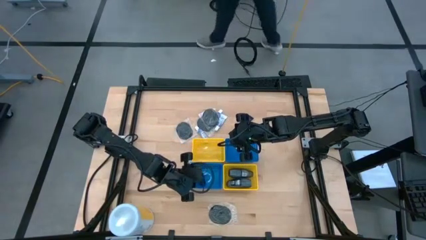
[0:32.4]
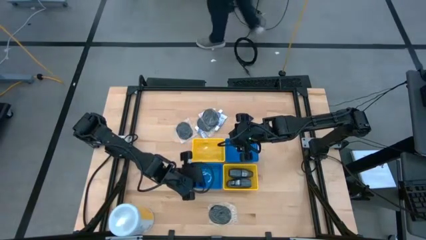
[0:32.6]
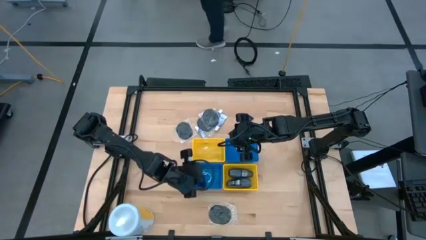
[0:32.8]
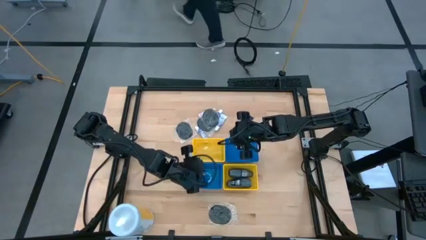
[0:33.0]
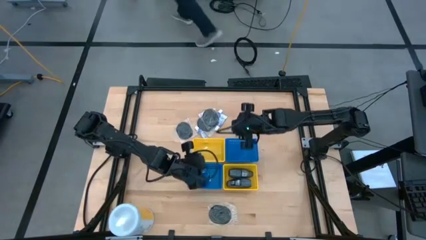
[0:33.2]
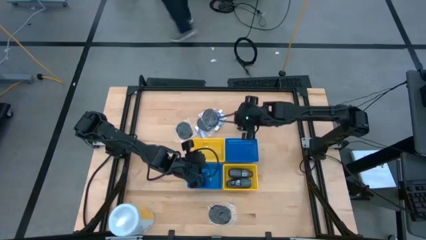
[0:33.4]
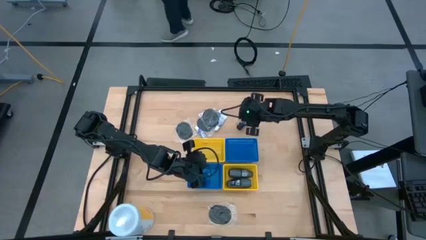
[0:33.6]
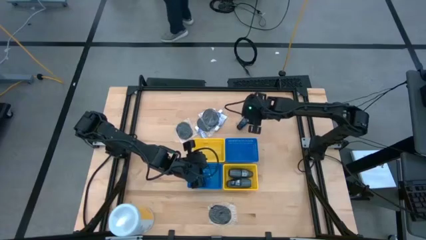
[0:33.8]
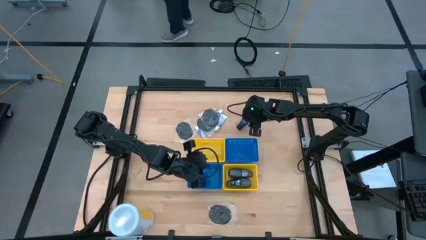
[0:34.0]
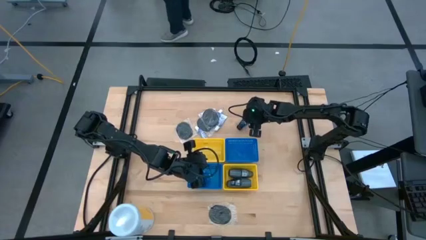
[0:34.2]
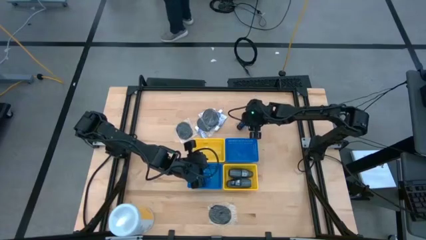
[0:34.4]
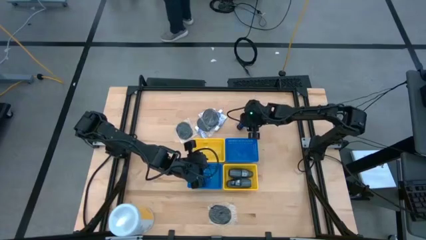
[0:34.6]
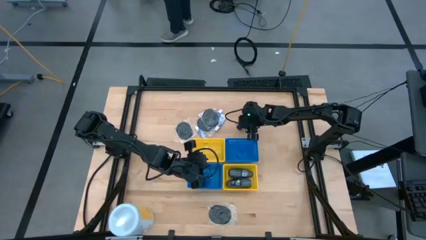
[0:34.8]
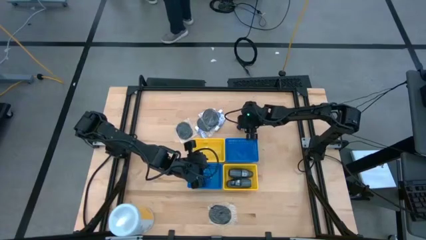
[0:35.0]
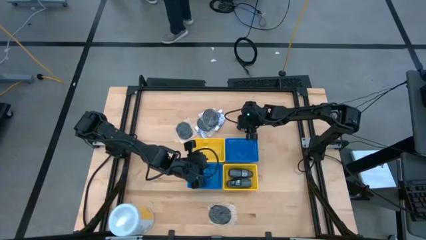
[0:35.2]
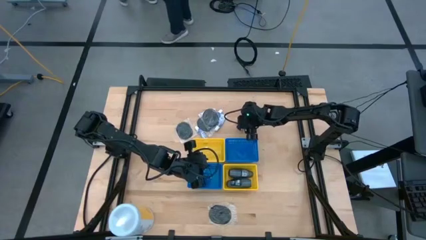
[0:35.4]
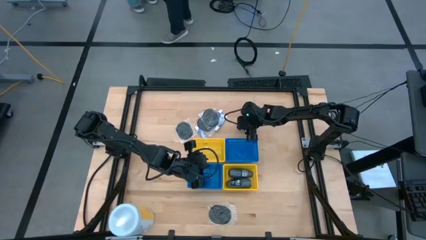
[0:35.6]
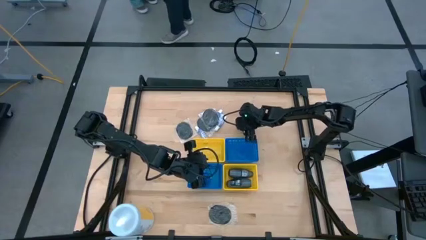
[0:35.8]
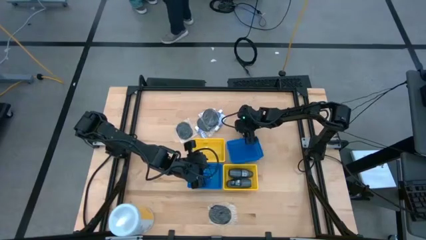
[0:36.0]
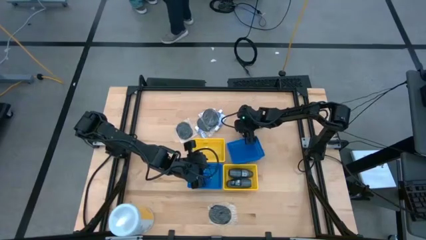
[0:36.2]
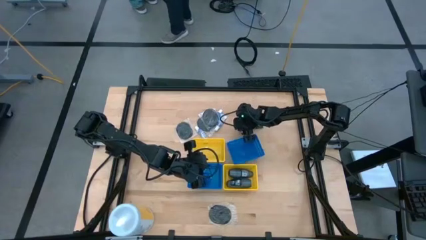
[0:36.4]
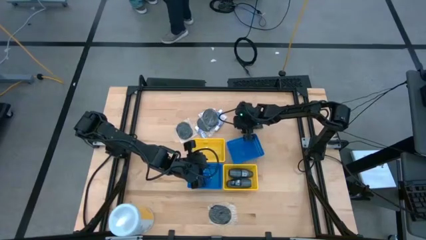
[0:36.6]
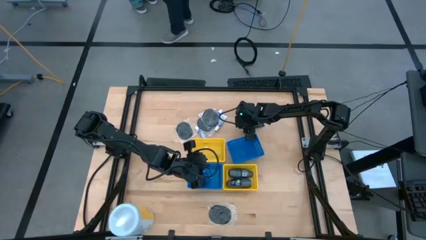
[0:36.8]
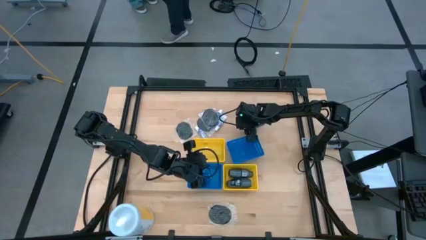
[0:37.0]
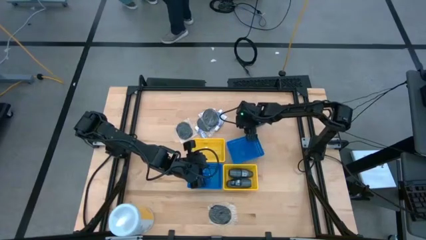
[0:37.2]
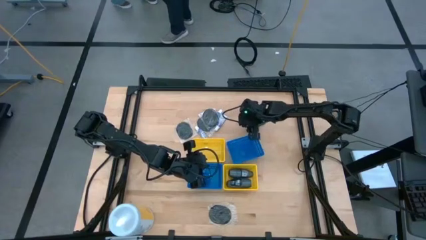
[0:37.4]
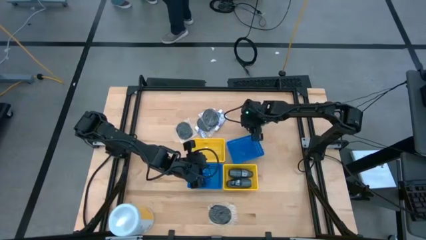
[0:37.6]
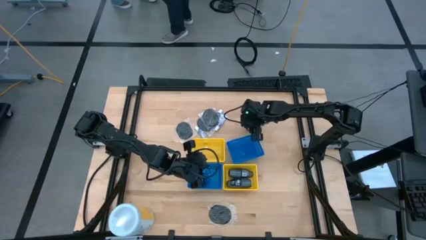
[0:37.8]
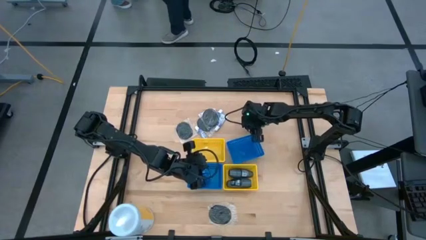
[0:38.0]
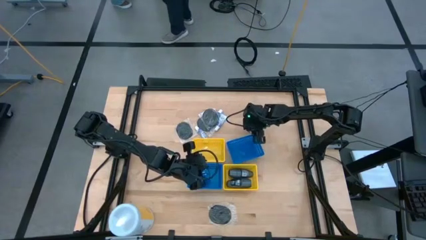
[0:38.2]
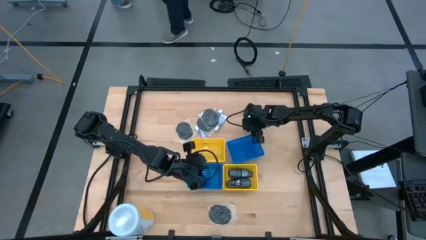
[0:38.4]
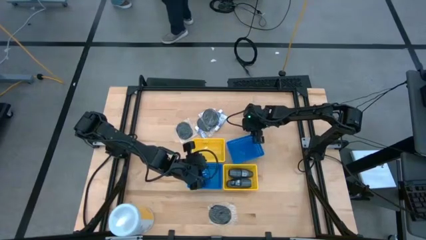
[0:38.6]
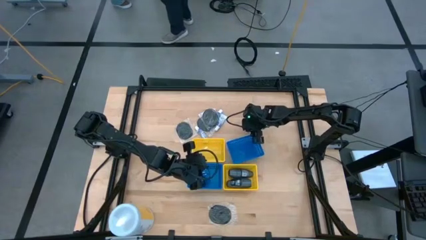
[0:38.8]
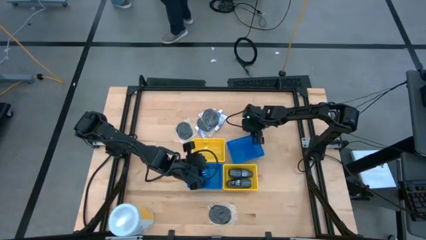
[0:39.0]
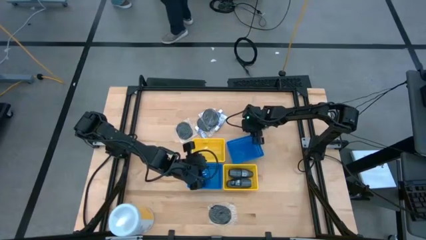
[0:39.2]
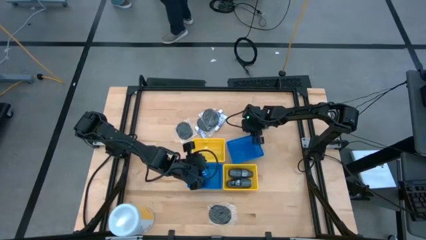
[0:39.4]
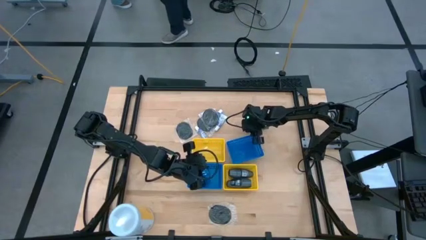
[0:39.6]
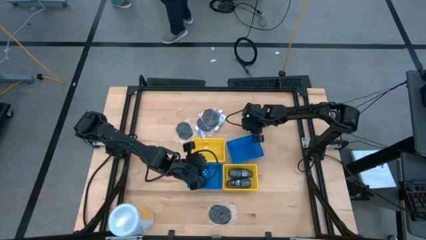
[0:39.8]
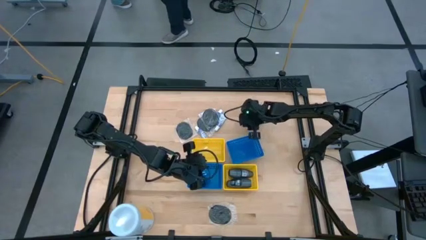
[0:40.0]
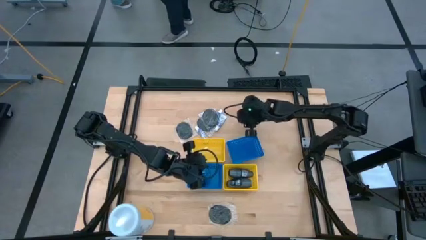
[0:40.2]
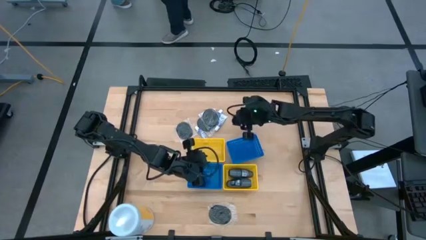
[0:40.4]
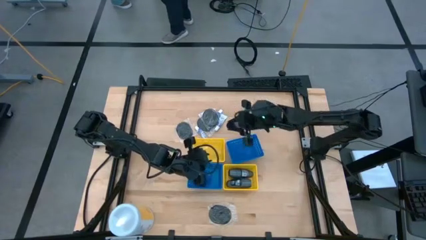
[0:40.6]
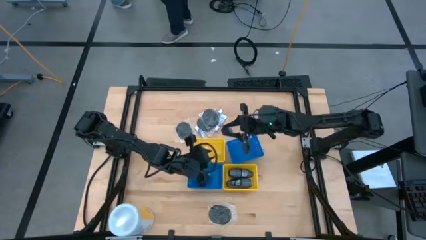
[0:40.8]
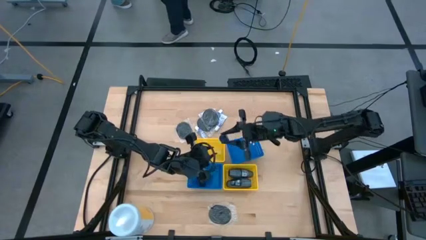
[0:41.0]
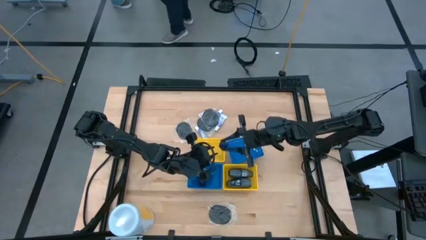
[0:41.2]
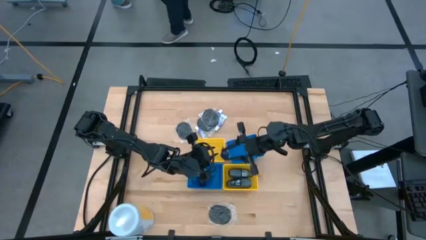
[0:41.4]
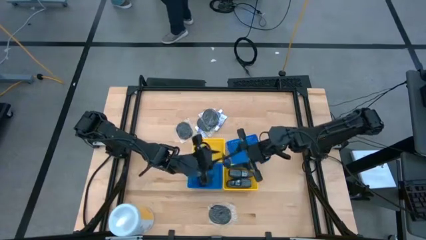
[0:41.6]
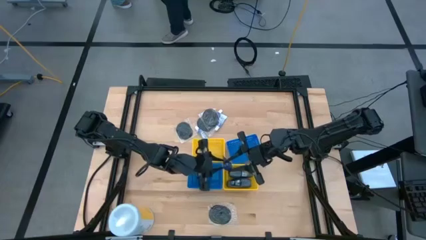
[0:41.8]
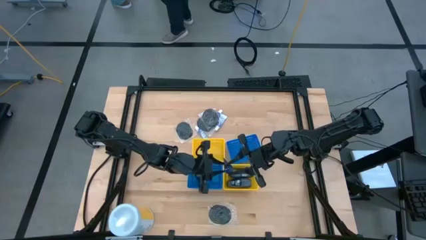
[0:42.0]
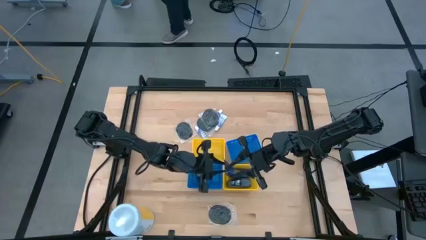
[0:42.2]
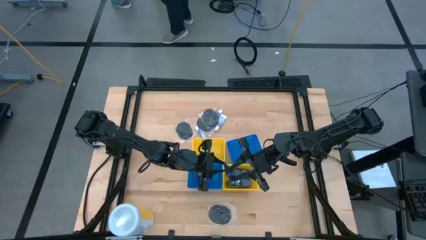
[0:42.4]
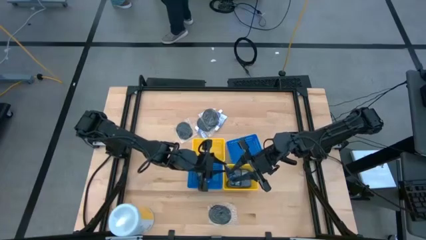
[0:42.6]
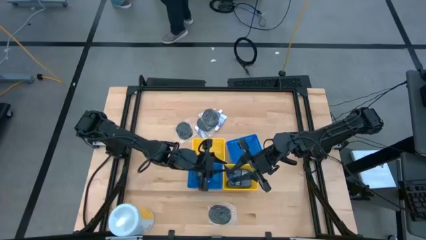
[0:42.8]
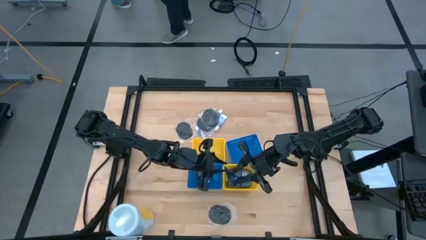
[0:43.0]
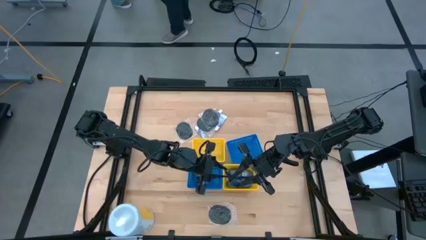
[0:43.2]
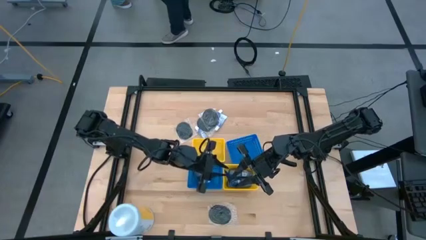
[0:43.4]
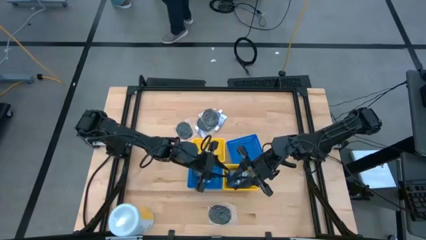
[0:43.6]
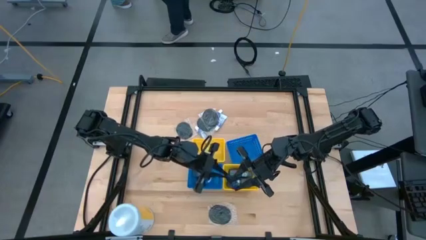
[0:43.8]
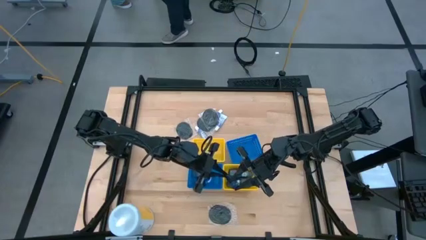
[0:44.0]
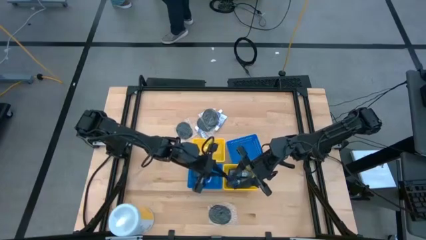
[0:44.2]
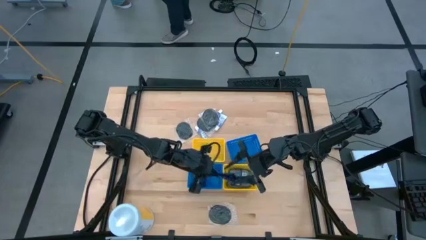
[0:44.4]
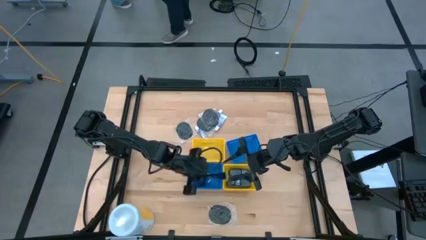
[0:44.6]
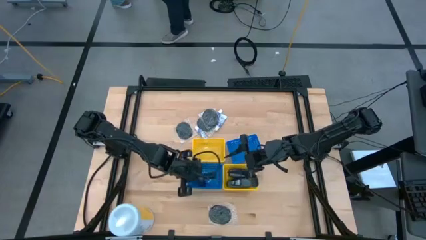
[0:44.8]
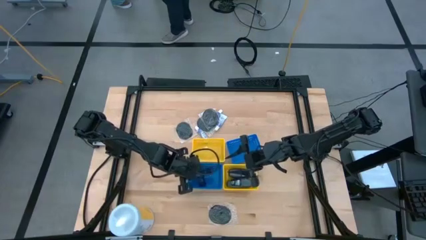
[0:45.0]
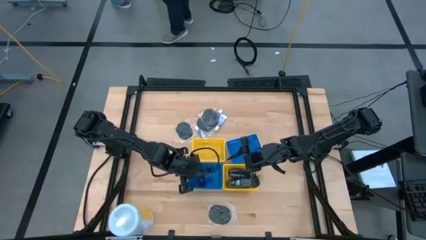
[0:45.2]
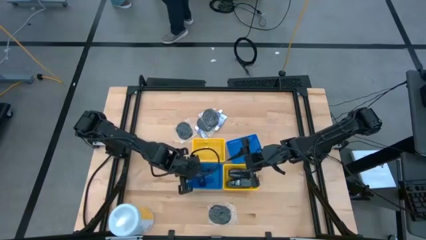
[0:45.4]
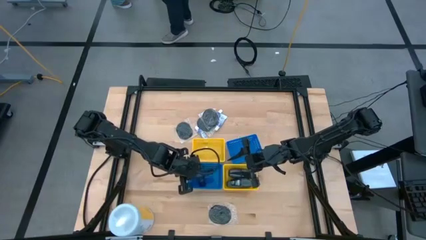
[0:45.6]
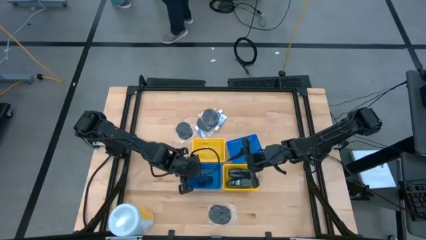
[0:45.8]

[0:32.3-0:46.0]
Task: Pick & Place Travel size toiletries
Put the shaving cream in the bottom blue bin

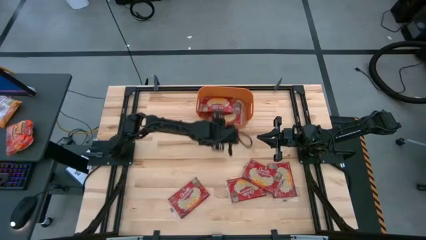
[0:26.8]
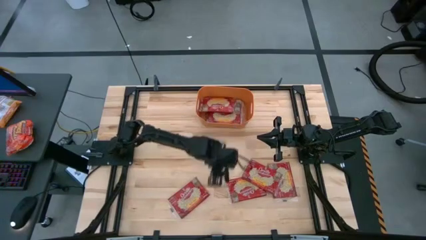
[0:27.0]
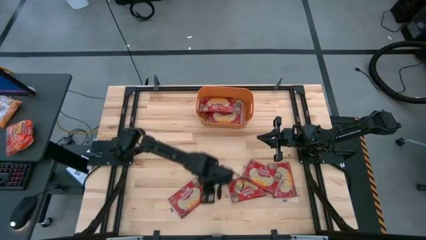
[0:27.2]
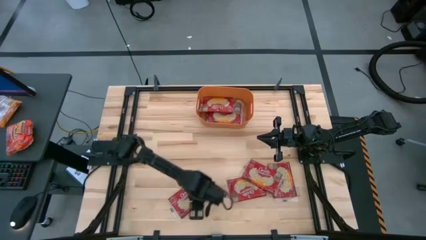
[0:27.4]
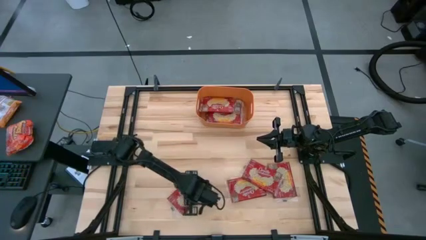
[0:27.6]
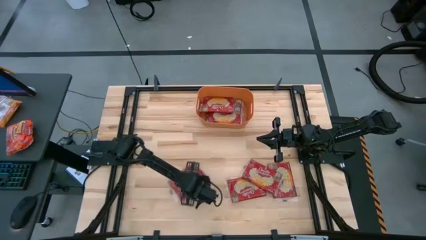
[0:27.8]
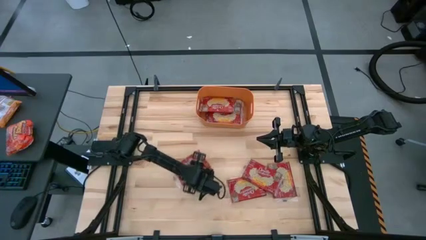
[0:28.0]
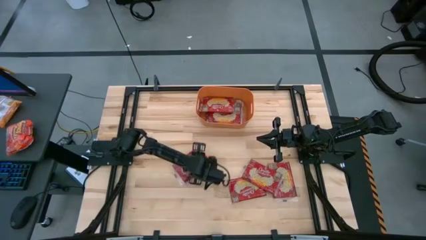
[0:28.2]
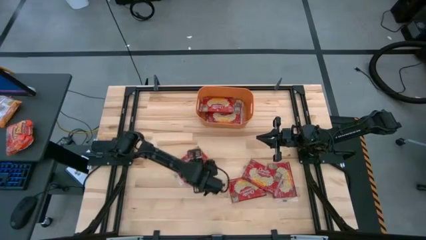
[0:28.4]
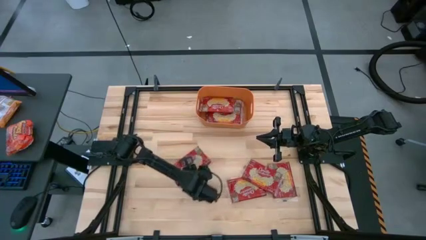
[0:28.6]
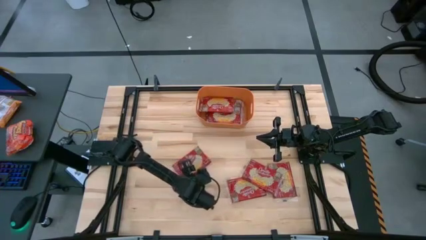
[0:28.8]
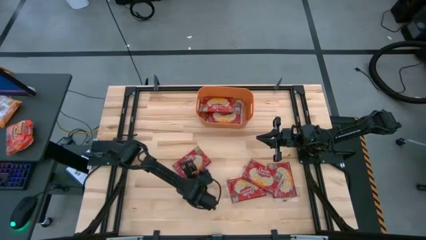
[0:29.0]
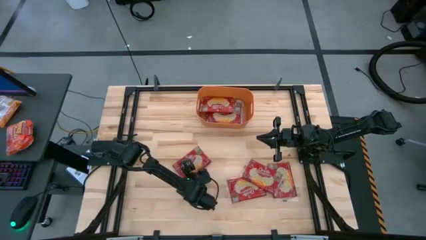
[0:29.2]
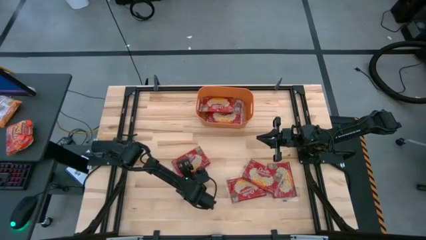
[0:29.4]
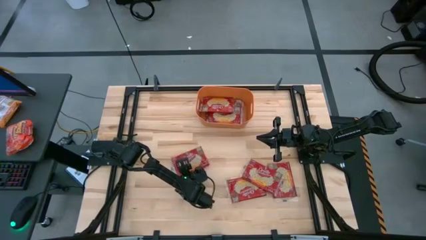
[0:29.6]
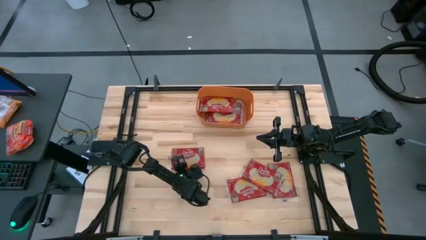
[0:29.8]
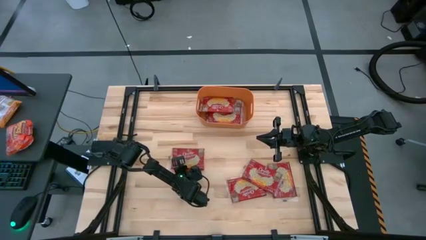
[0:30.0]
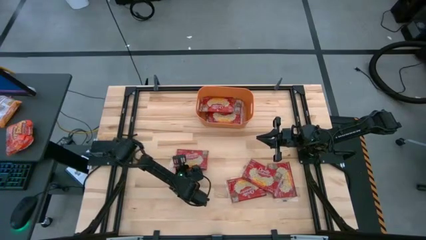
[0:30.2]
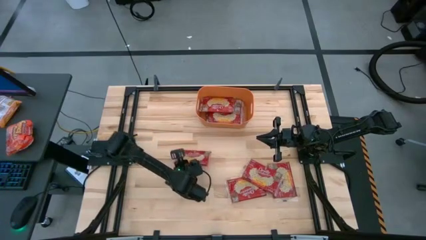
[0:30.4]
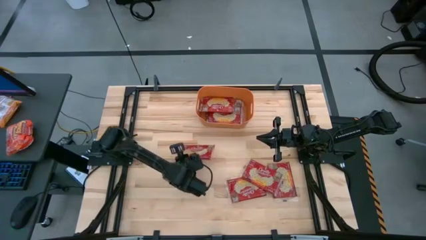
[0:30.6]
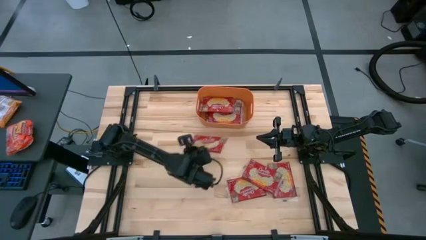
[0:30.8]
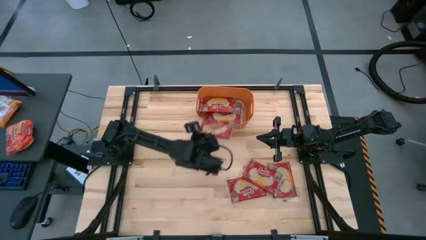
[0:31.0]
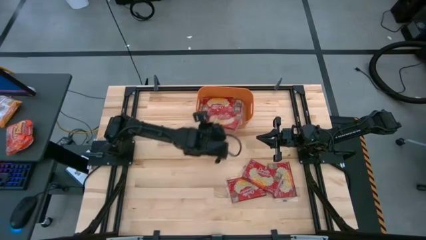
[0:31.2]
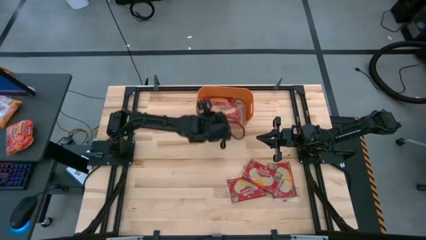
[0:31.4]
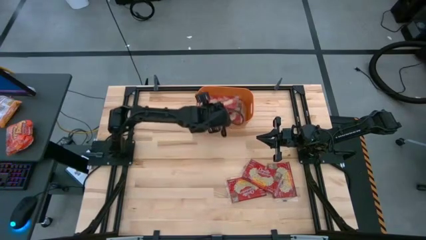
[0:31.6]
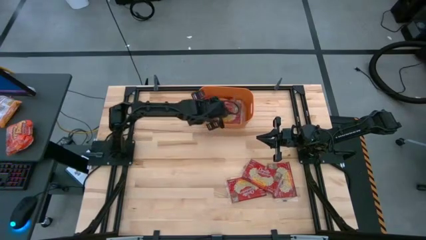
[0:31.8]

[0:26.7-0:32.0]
Task: Sort popcorn bags into baskets
Put the red popcorn bag into the orange bin
